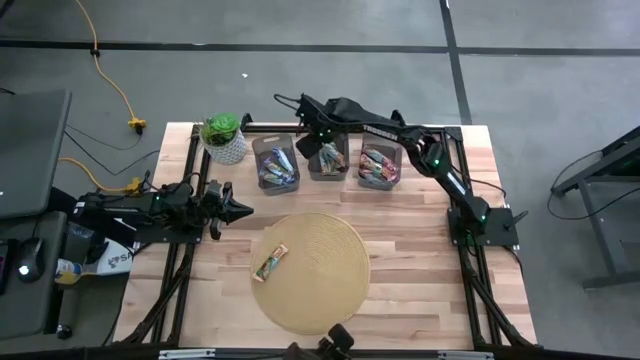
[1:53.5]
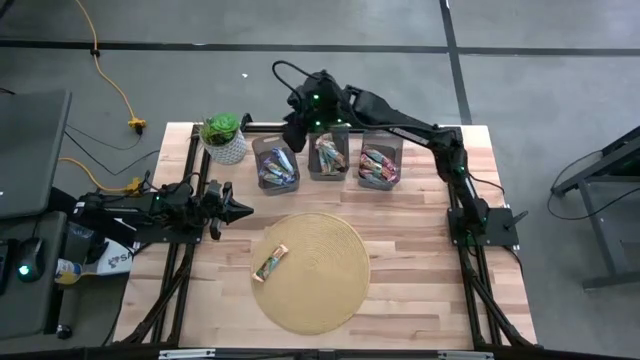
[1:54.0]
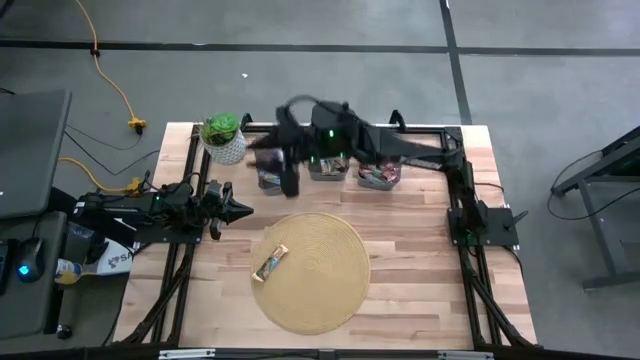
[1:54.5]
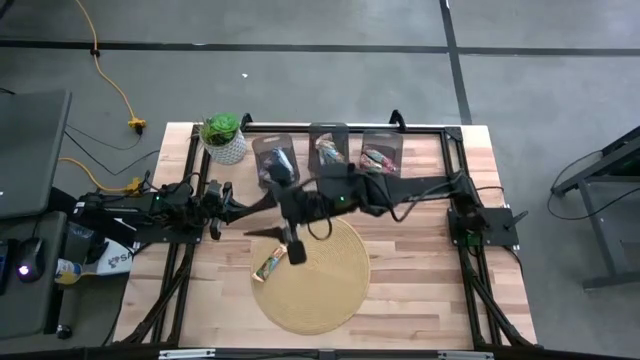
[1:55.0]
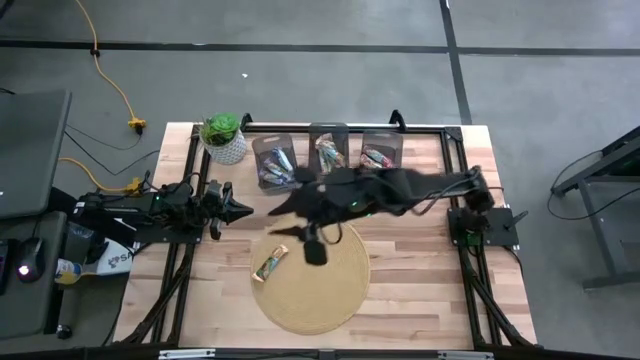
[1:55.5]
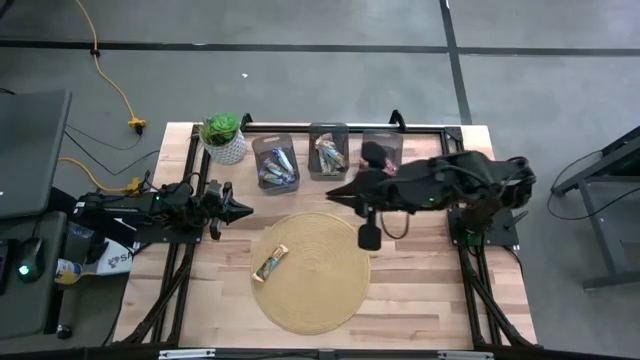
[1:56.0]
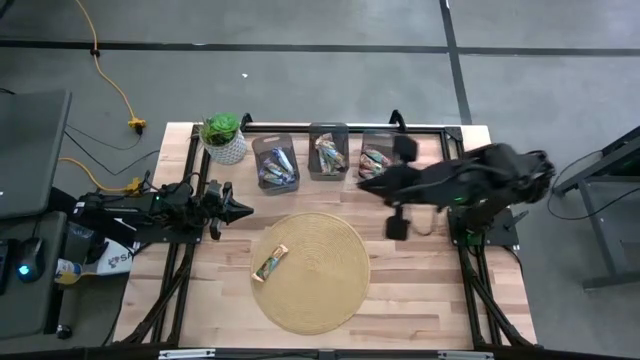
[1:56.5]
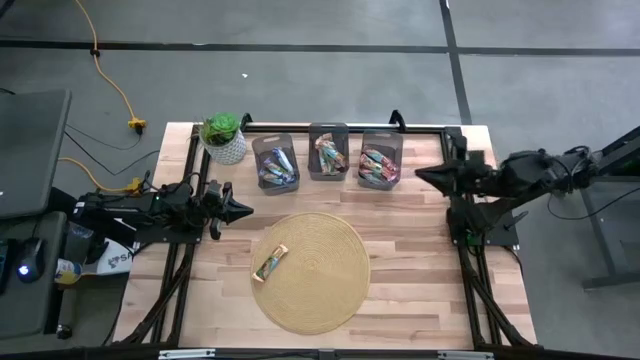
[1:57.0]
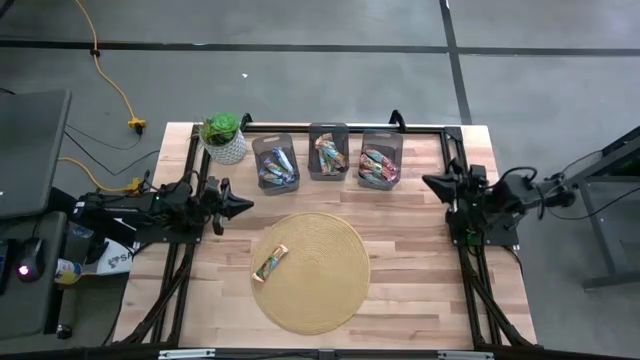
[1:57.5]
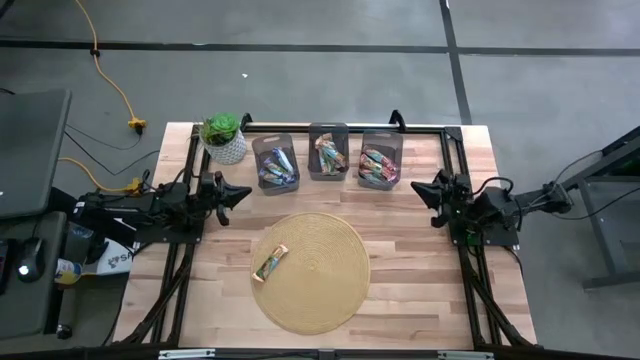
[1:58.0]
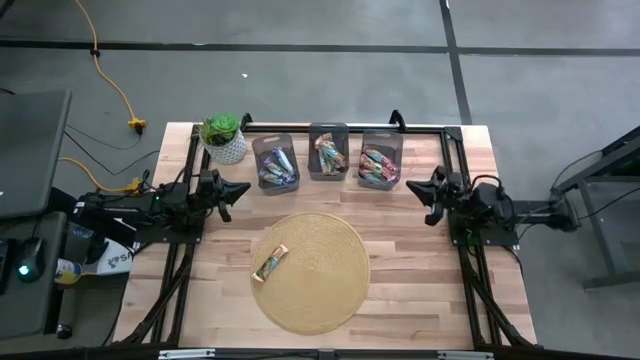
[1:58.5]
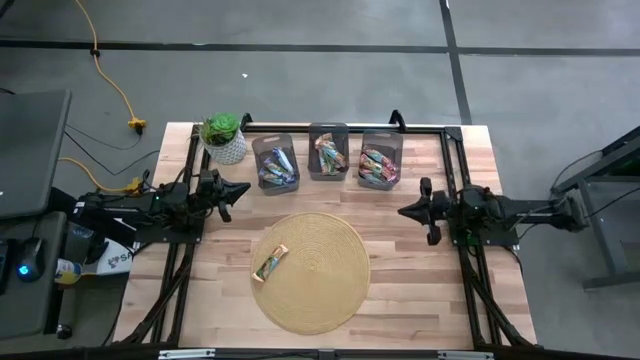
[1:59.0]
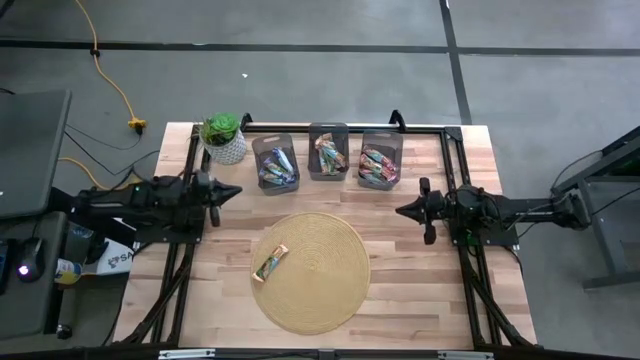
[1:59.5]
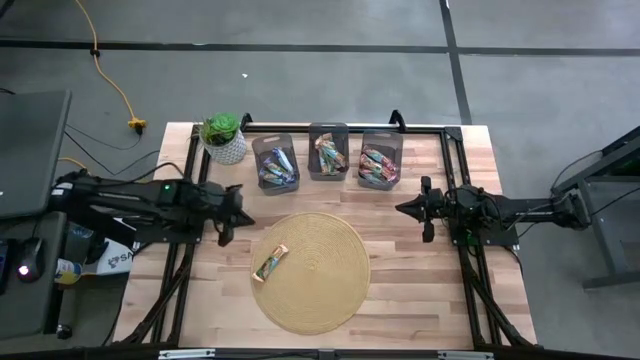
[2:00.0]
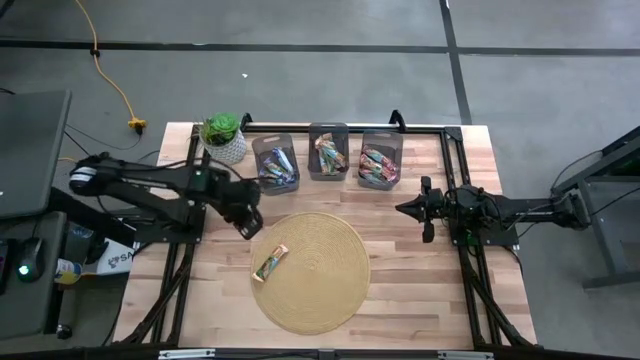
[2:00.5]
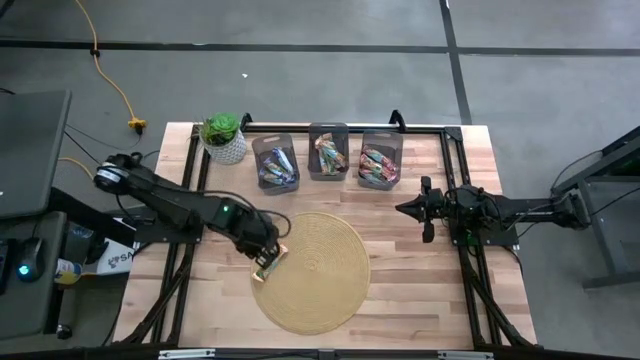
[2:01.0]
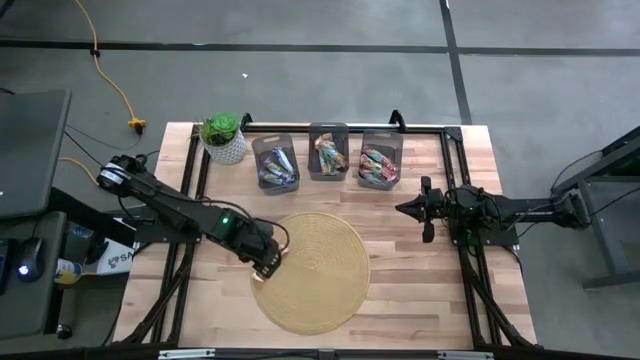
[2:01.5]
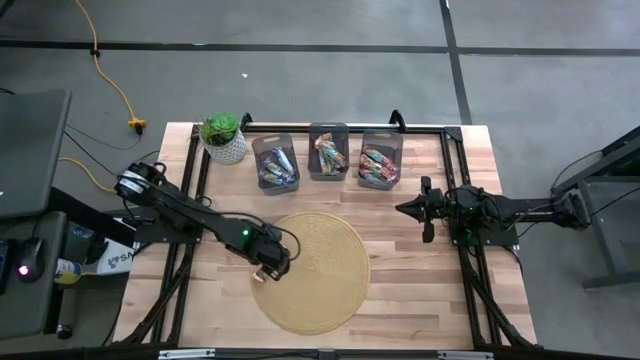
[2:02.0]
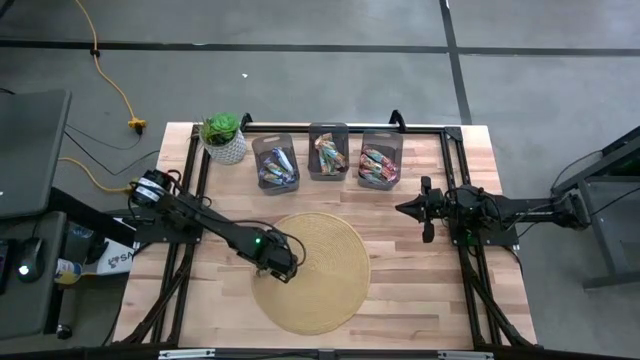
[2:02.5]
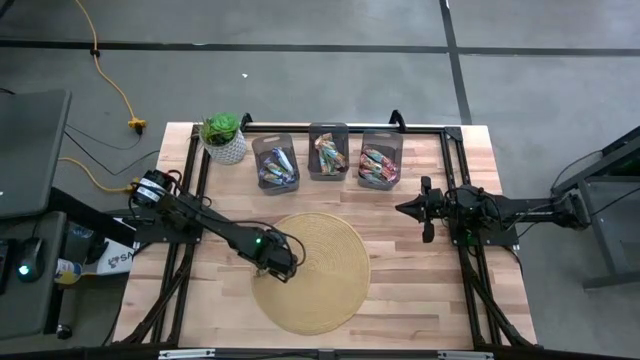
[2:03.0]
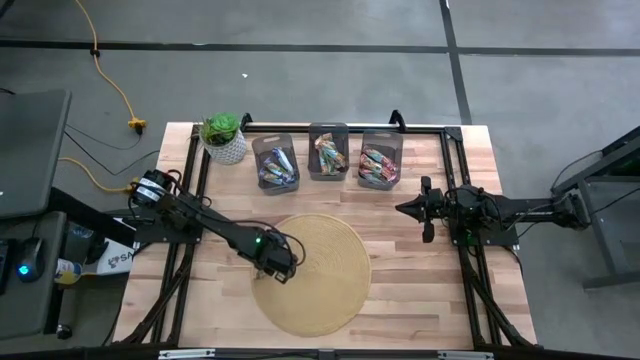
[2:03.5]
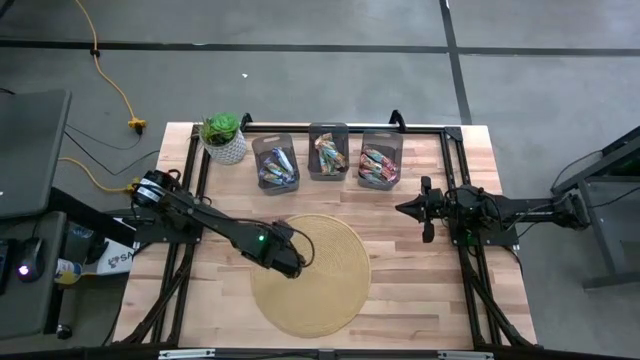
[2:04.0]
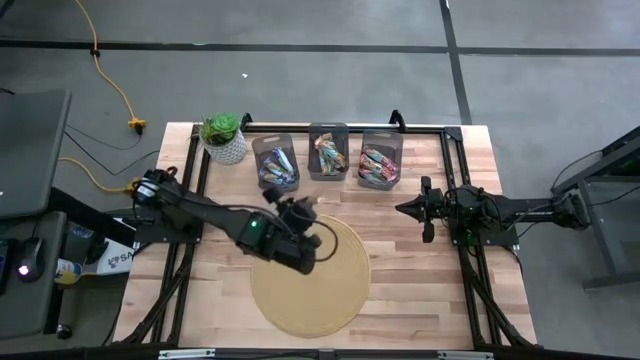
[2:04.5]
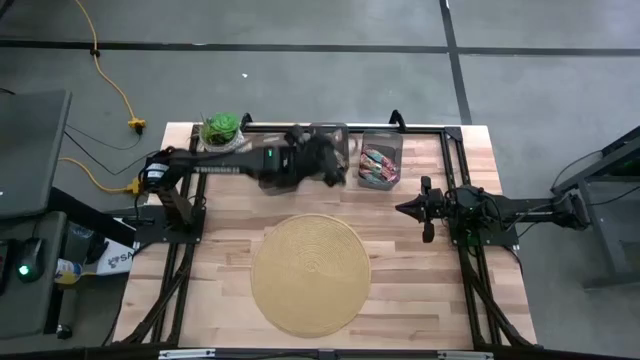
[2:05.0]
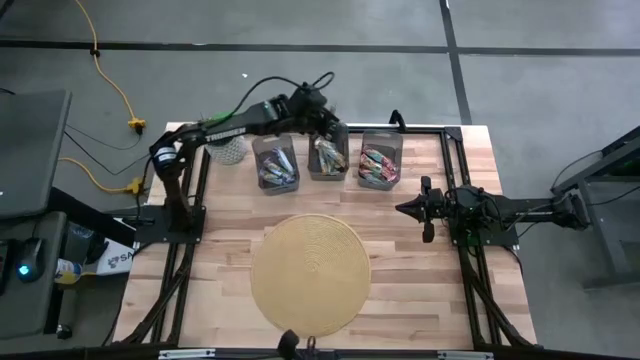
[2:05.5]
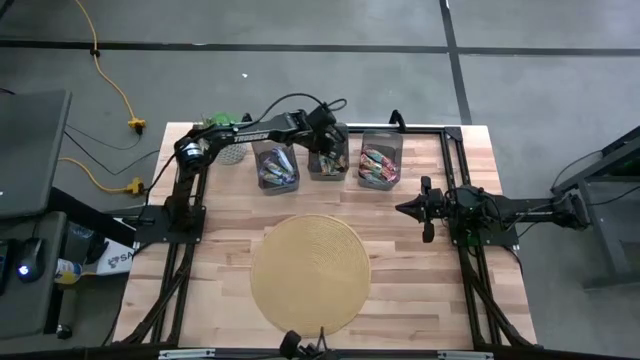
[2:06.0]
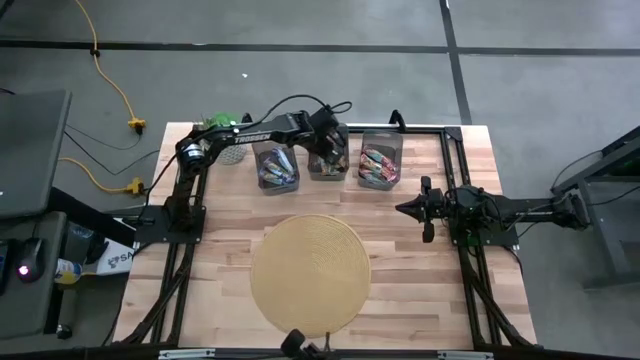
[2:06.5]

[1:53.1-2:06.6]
Task: Pick and place Granola Bars by type
Put the yellow granola bar into the center black bin

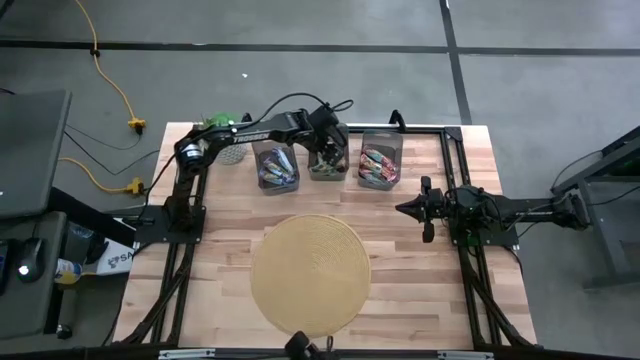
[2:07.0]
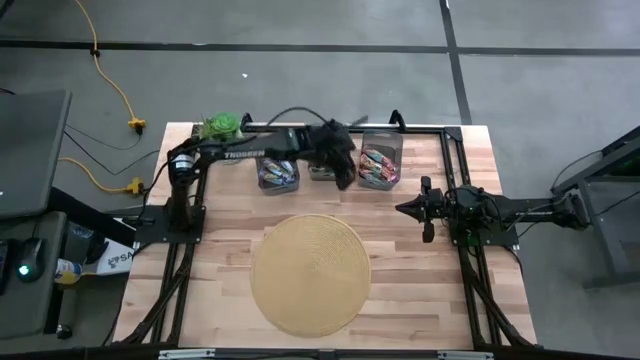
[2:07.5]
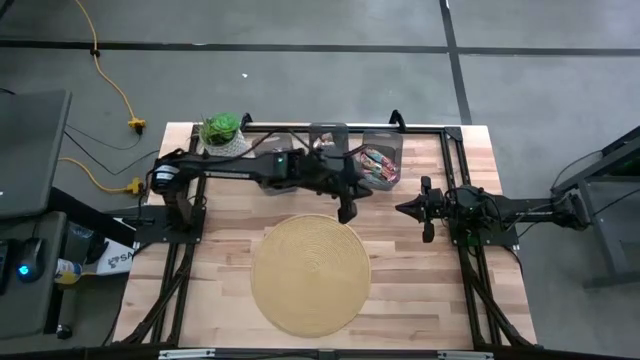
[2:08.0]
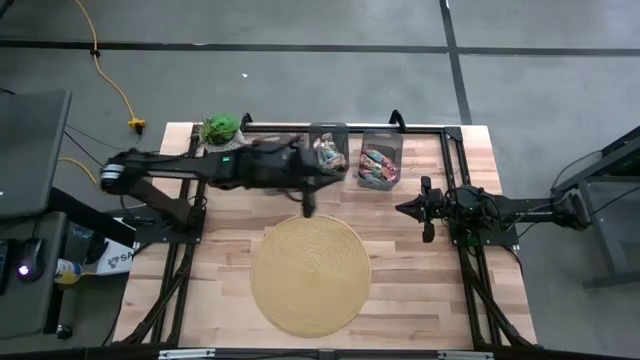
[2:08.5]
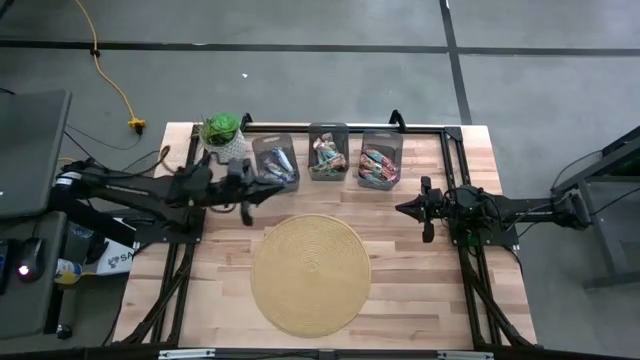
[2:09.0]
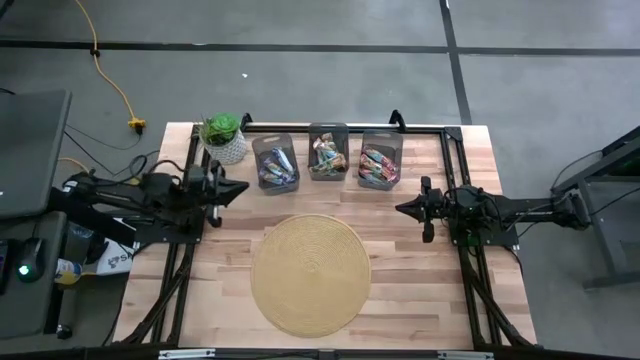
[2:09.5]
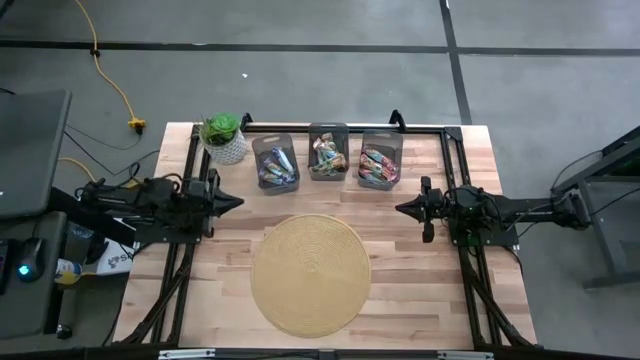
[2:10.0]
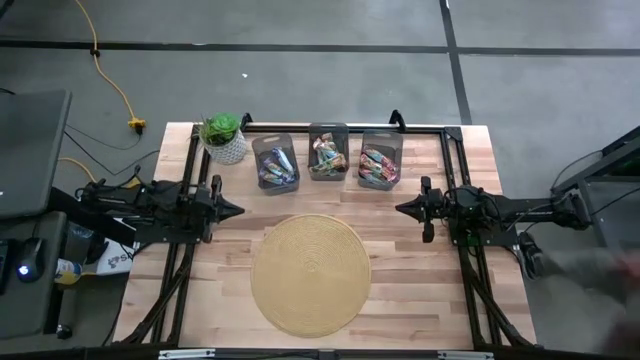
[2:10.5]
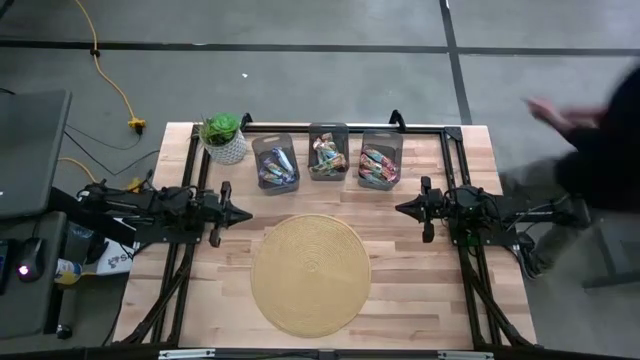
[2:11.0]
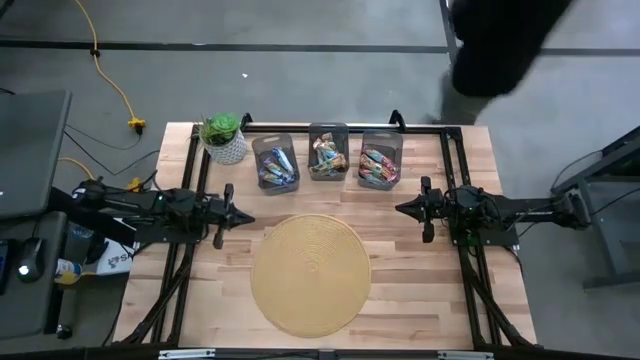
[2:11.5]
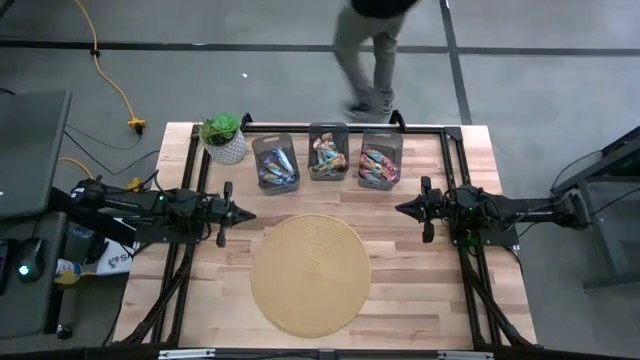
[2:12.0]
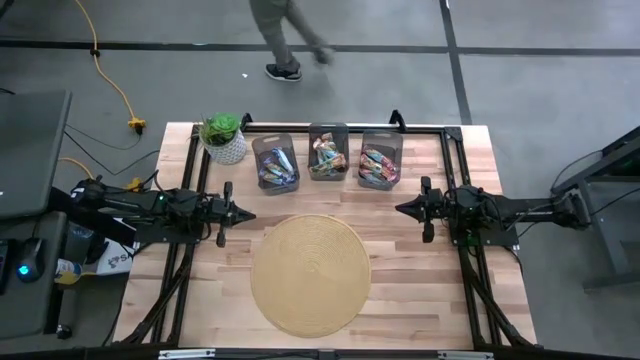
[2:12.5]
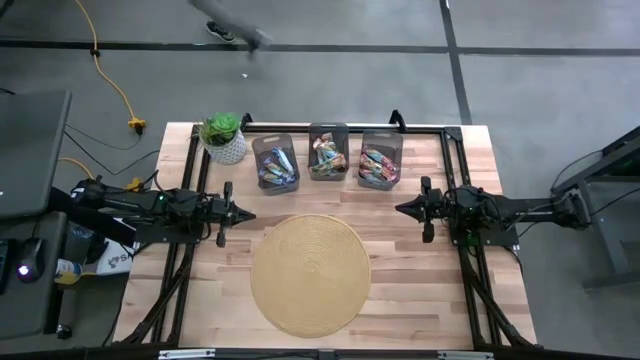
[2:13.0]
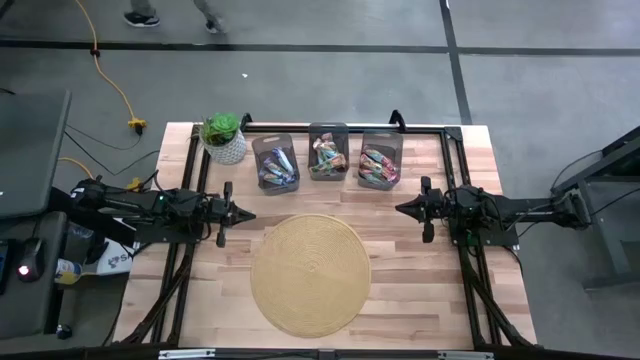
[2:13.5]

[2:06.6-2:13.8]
Return to Home Position
